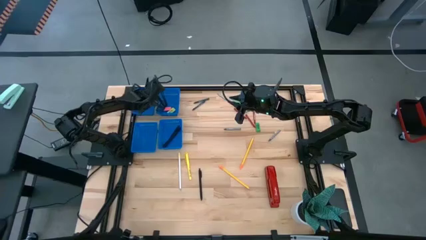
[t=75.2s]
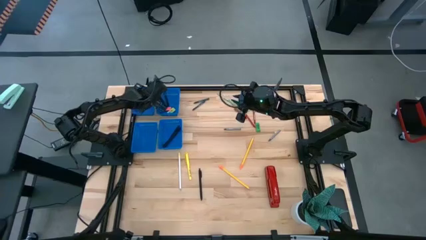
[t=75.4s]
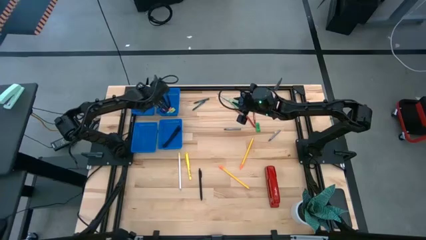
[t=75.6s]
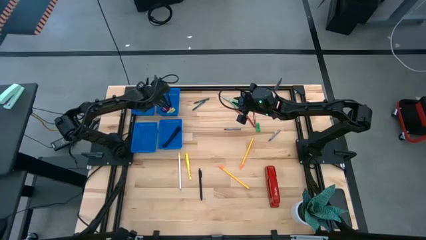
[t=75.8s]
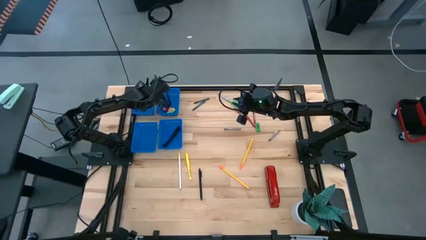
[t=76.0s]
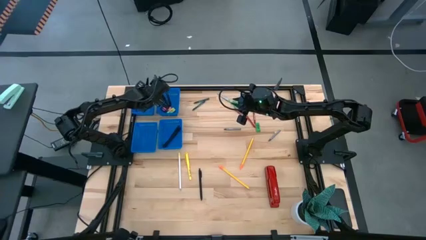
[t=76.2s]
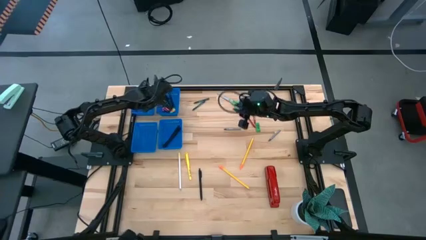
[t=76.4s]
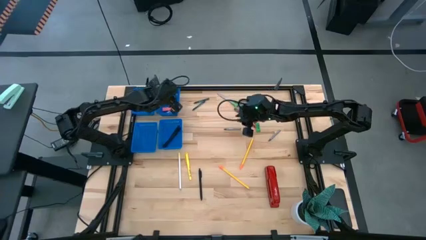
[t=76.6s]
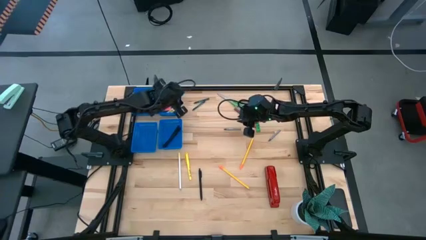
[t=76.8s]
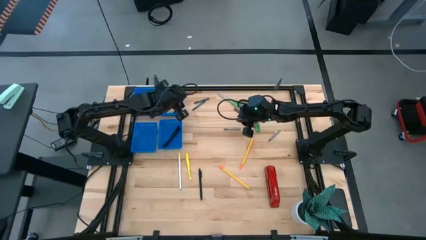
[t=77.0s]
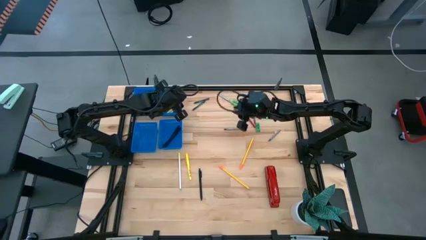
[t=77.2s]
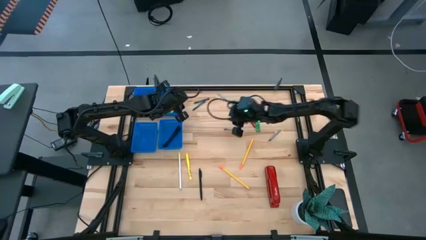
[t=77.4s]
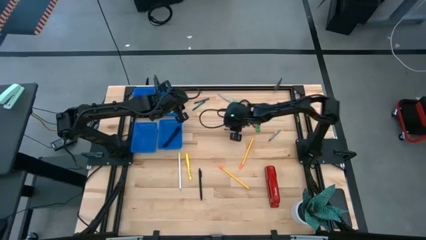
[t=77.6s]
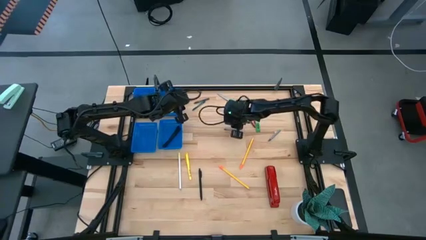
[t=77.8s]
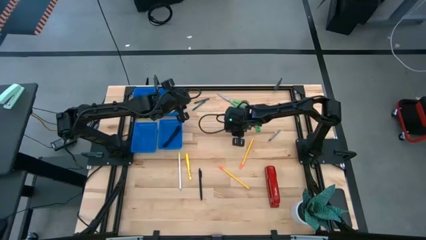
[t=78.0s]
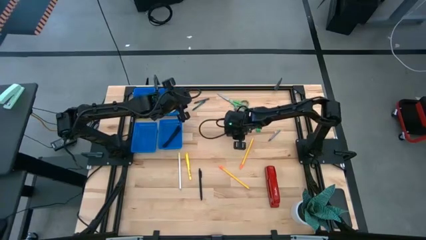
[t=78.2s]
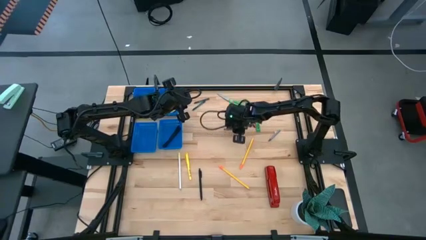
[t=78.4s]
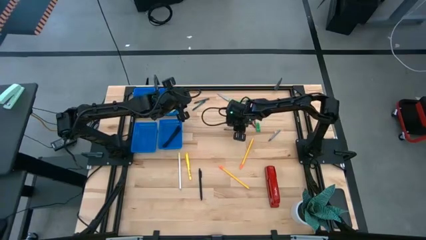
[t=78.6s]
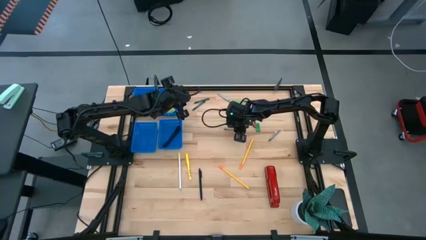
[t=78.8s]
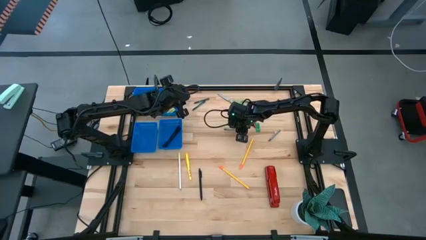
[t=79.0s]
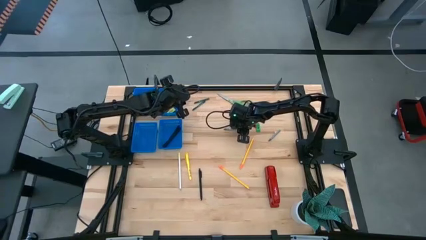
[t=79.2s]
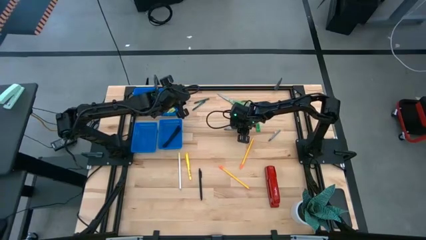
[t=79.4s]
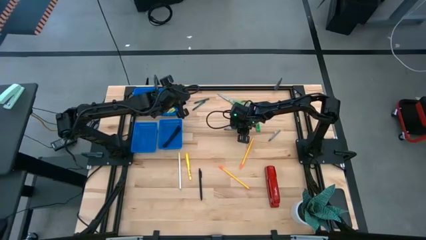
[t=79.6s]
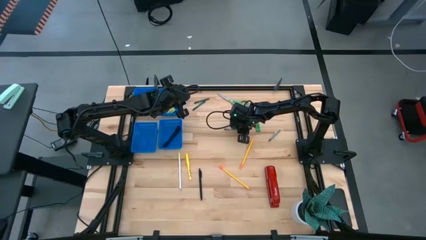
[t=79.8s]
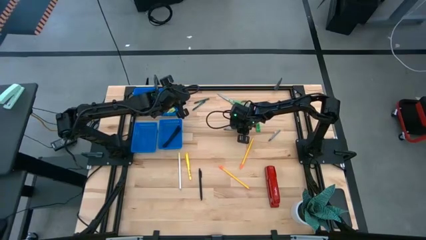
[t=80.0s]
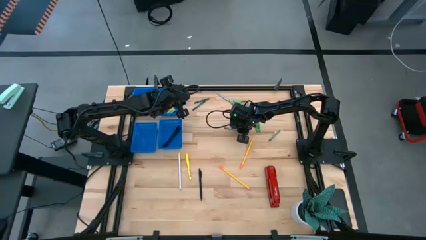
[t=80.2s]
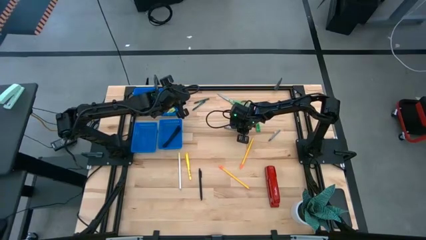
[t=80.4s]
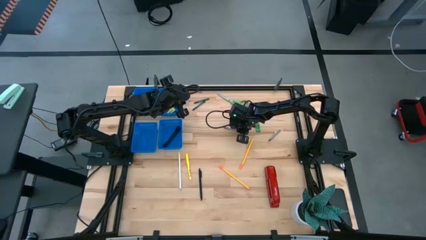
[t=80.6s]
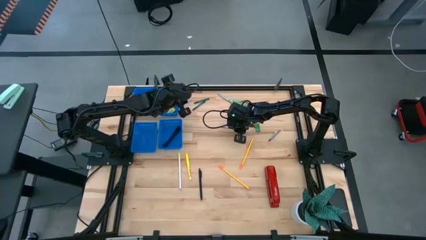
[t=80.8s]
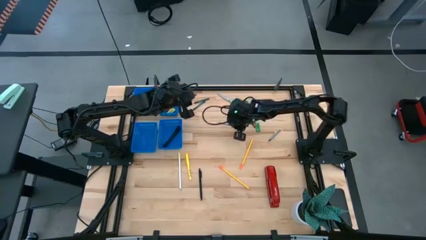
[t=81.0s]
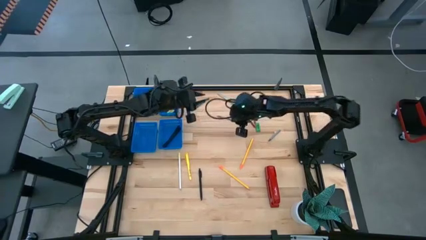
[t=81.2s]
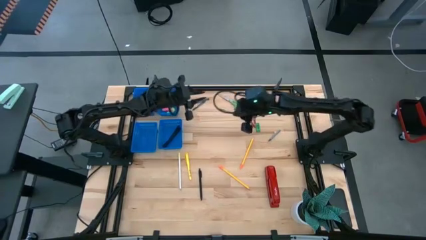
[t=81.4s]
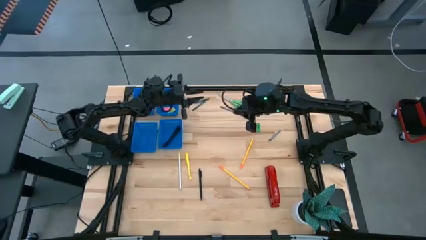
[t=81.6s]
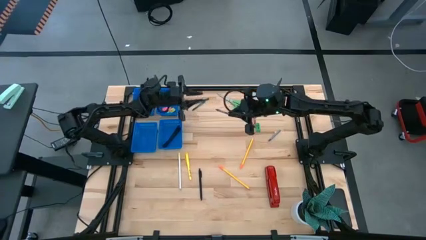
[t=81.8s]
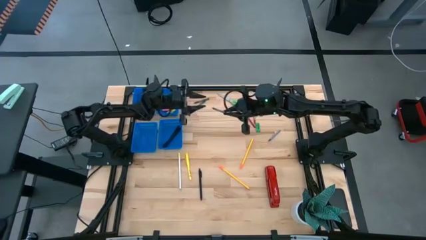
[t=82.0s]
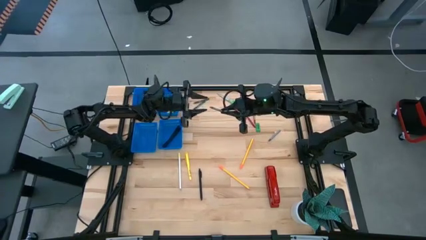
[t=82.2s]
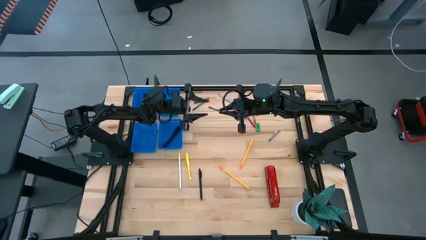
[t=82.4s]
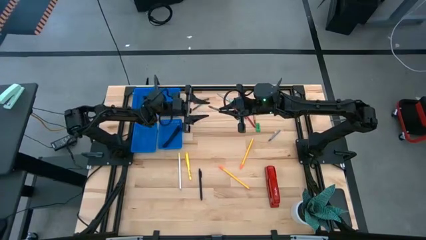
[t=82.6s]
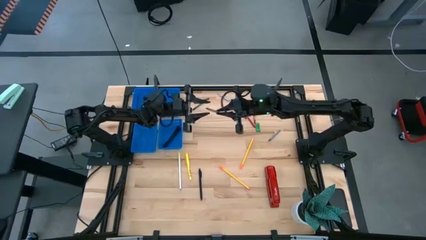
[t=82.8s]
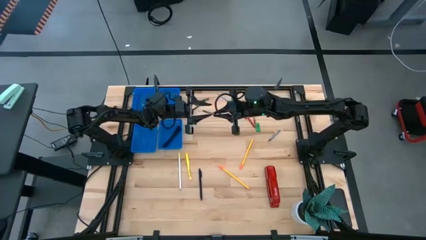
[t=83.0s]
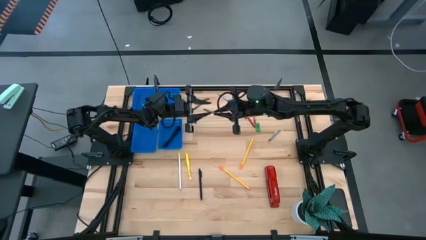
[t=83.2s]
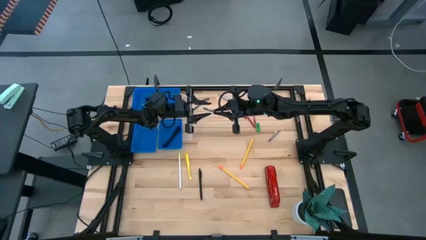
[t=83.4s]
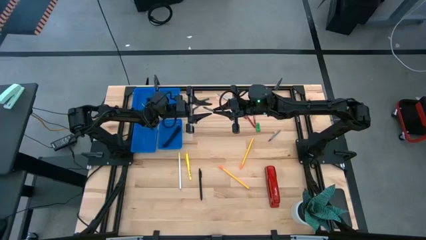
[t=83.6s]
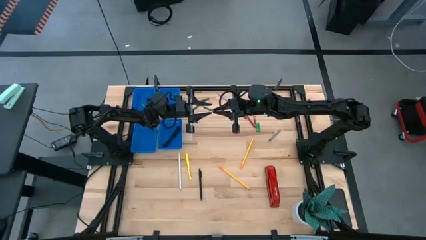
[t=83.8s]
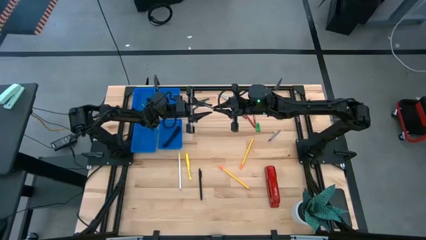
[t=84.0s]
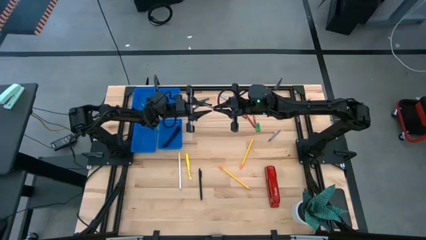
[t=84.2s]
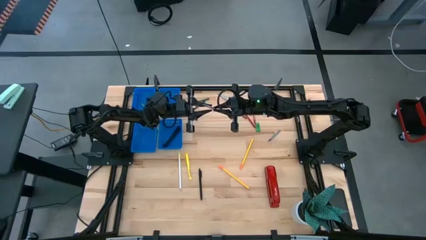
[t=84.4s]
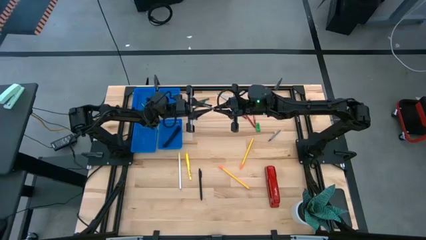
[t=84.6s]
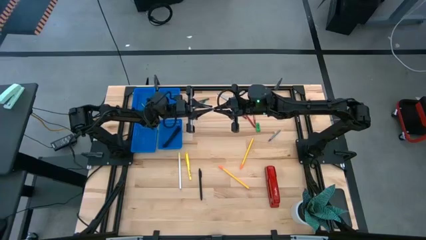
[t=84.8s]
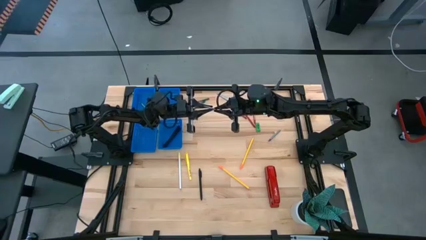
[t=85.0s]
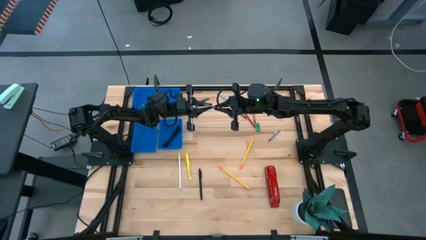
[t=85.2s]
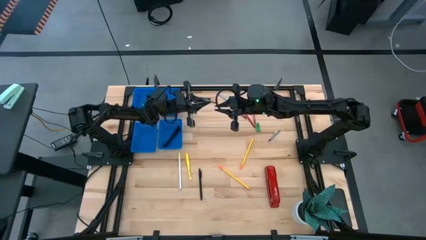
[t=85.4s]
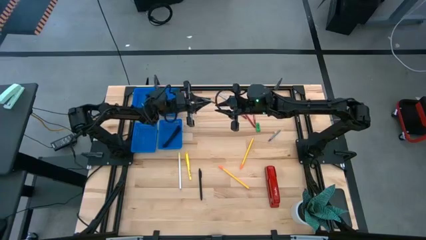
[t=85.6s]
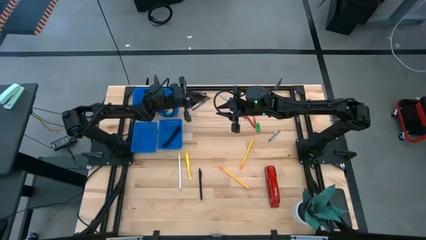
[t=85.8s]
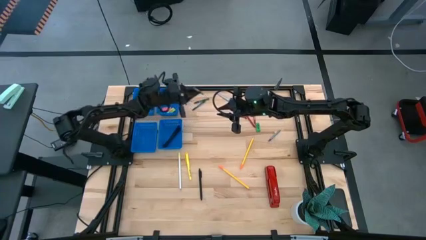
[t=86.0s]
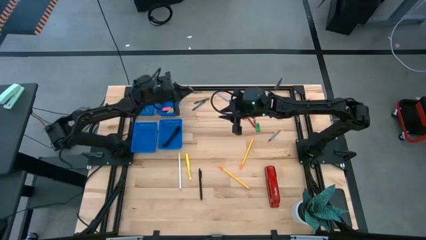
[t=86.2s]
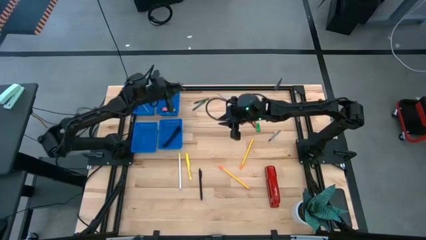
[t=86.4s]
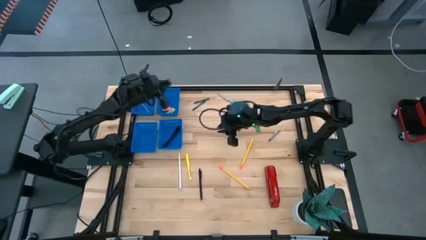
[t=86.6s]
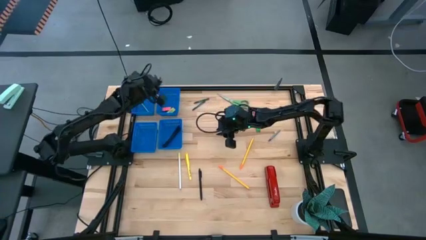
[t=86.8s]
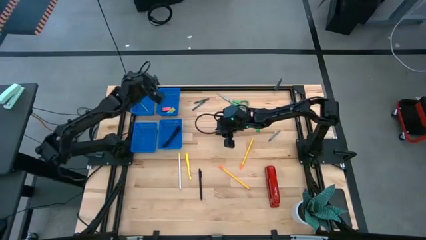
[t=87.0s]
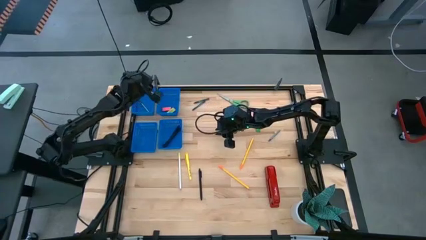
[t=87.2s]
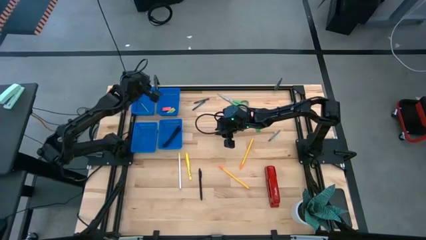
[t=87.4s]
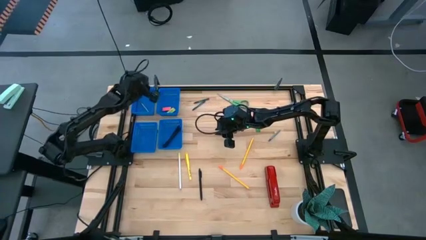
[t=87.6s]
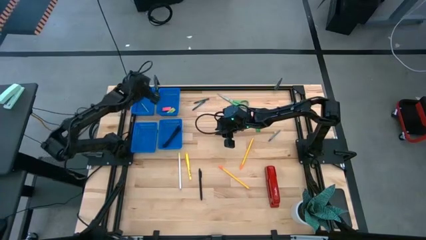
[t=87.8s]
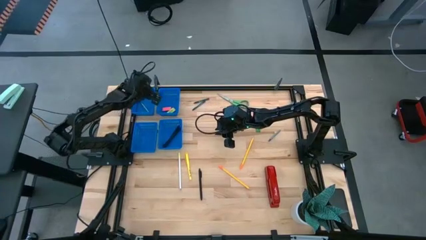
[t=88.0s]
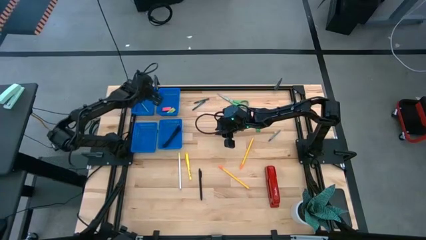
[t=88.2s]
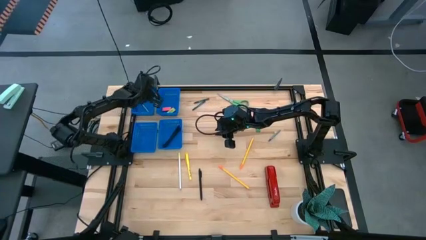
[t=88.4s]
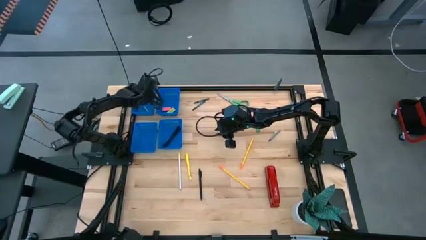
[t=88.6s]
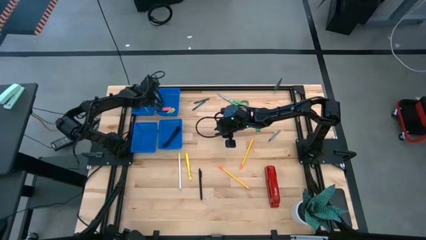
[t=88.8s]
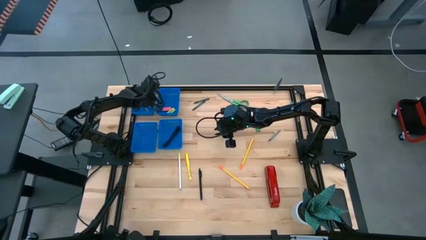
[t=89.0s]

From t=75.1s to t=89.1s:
Task: Sort crayons/erasers/pens/pencils in bins
Put the gray crayon into the top left blue bin

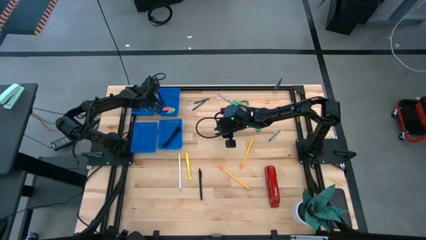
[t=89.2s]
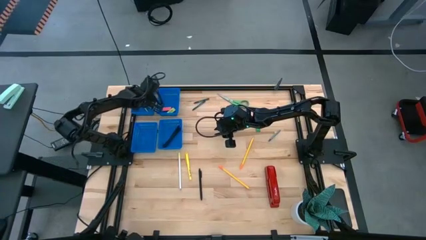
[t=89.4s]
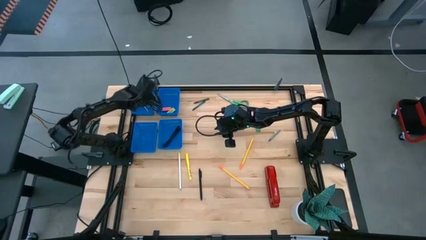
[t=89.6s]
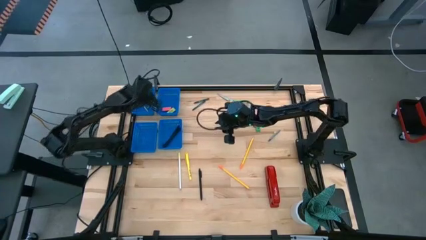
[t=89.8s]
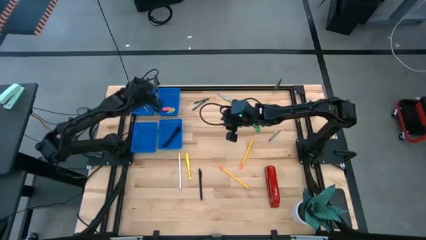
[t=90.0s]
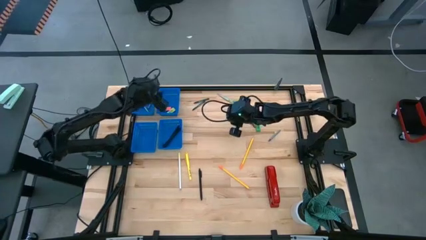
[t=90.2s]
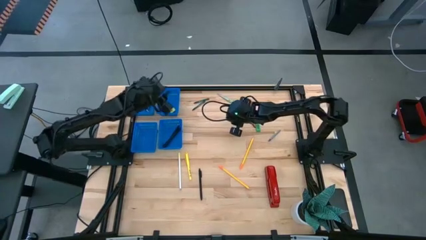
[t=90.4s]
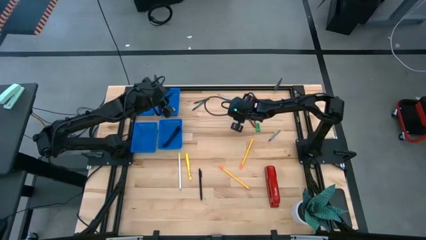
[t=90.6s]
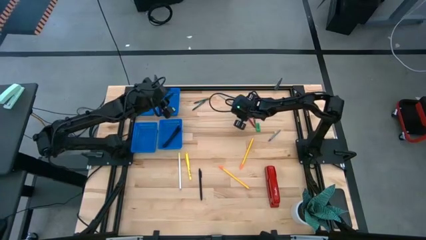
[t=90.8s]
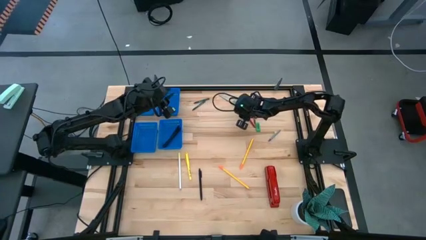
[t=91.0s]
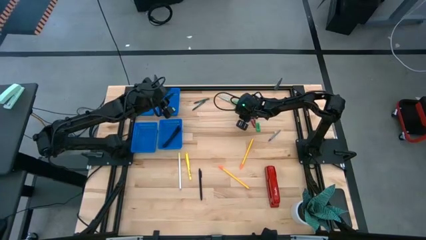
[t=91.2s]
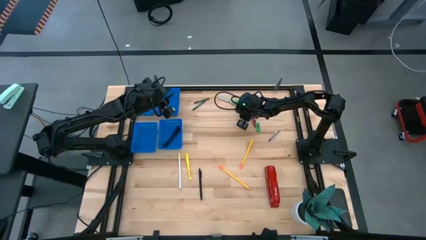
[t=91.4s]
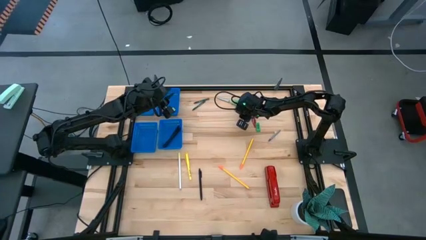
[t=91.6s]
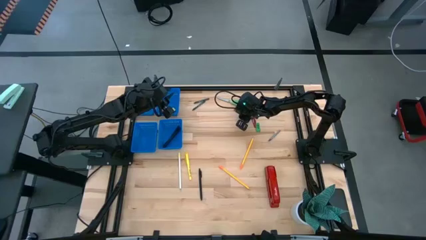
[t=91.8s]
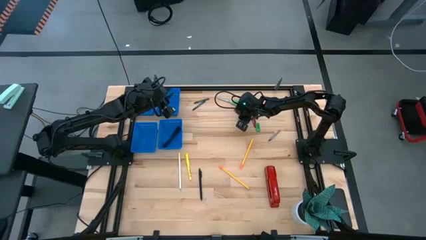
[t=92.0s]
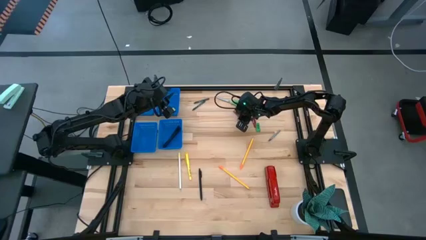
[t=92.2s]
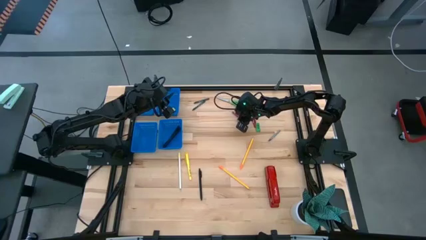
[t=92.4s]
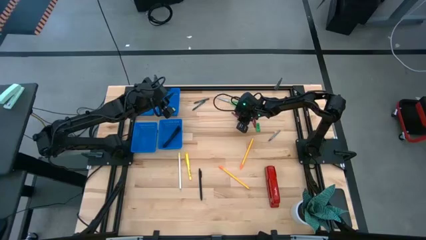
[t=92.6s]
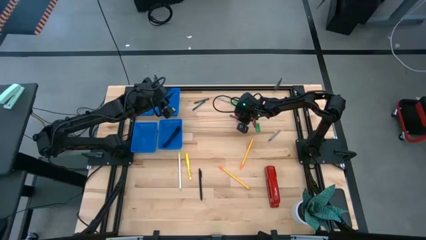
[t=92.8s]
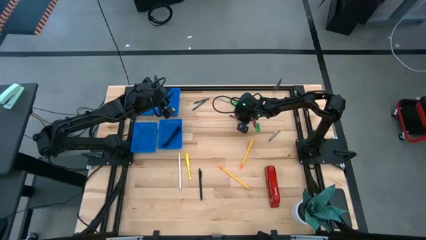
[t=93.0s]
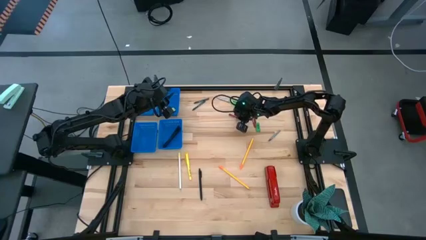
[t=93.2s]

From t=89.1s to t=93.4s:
Put the red crayon into the top left blue bin
